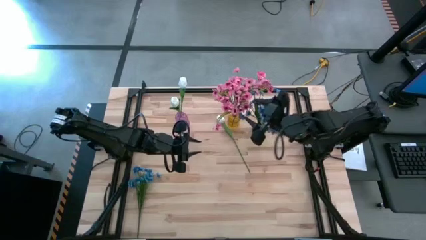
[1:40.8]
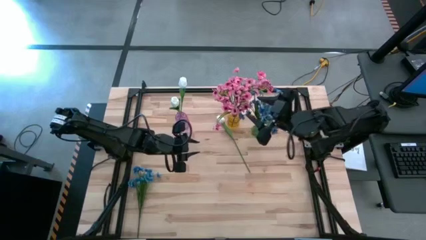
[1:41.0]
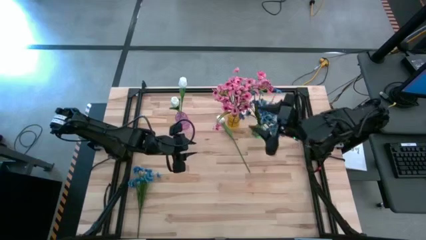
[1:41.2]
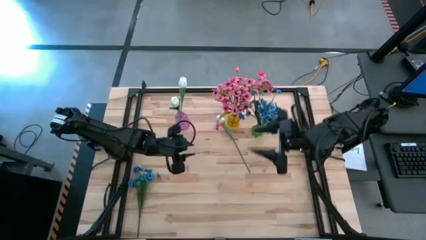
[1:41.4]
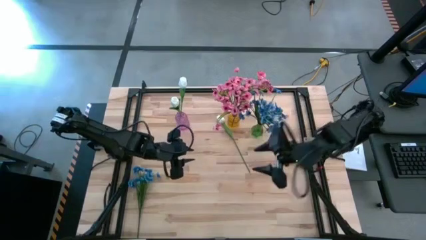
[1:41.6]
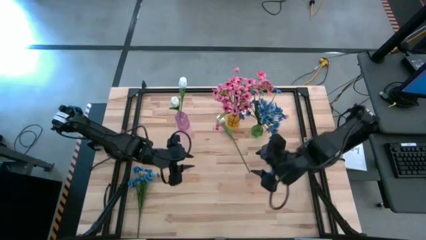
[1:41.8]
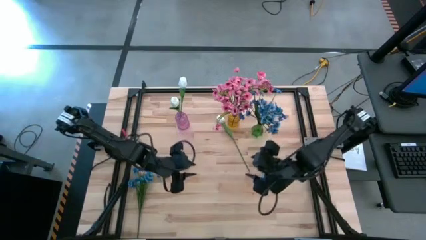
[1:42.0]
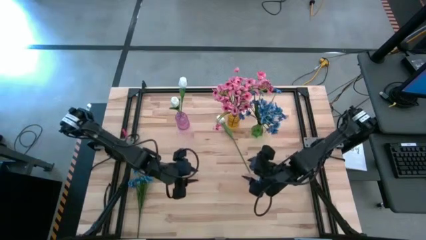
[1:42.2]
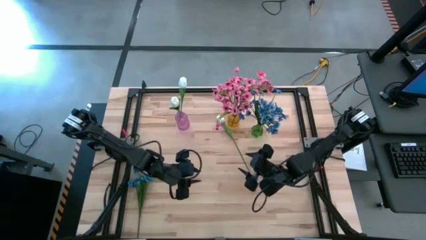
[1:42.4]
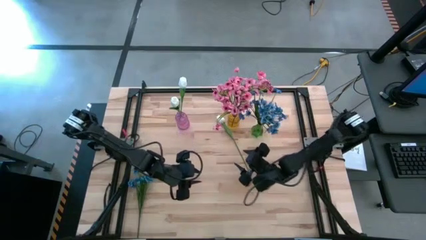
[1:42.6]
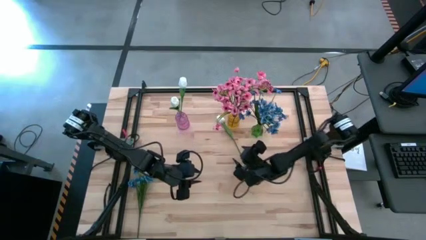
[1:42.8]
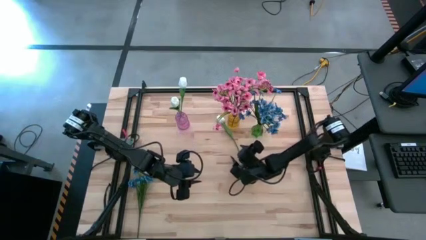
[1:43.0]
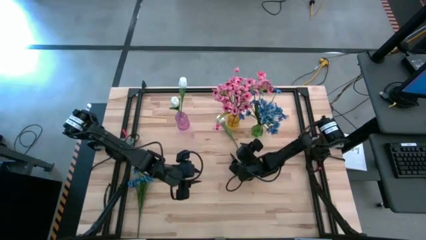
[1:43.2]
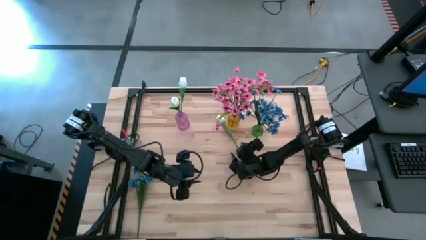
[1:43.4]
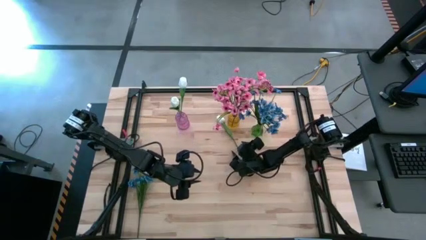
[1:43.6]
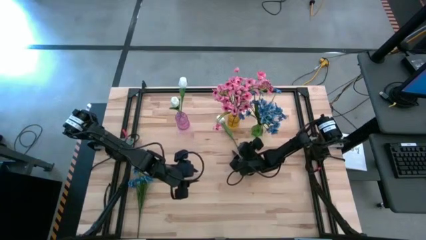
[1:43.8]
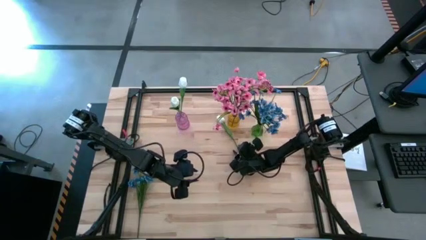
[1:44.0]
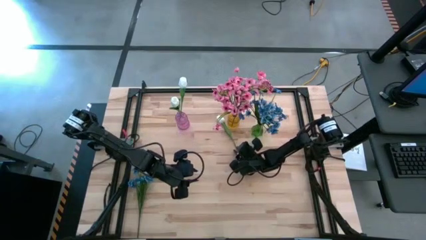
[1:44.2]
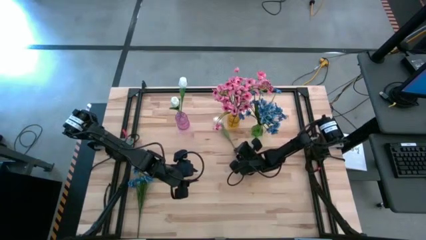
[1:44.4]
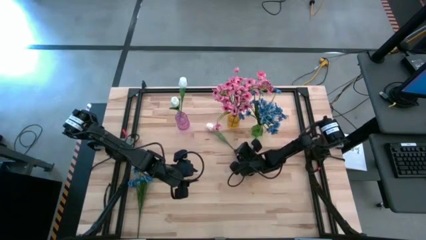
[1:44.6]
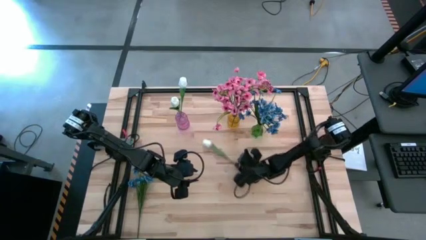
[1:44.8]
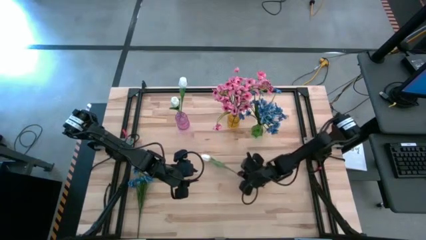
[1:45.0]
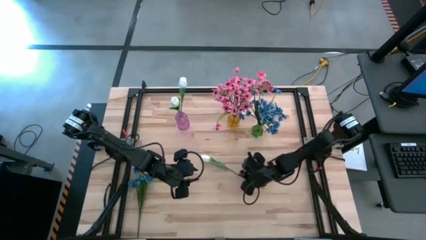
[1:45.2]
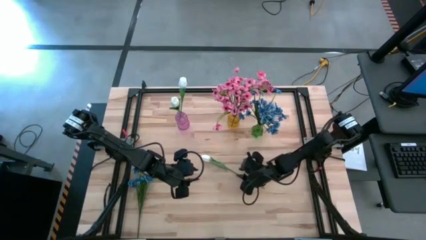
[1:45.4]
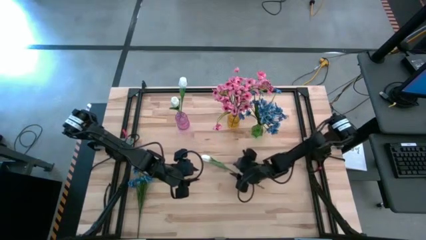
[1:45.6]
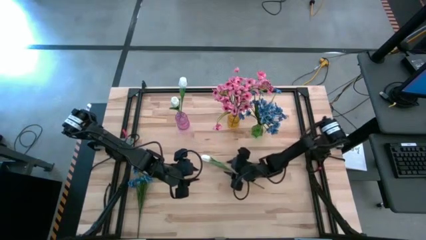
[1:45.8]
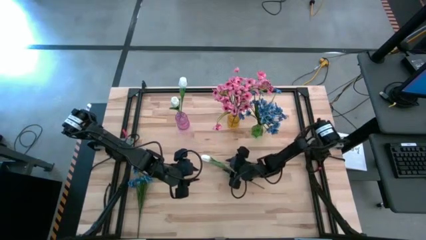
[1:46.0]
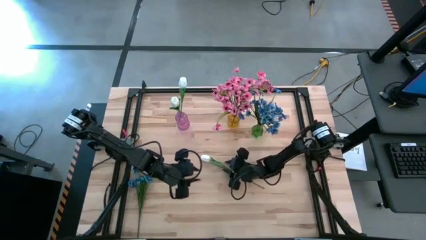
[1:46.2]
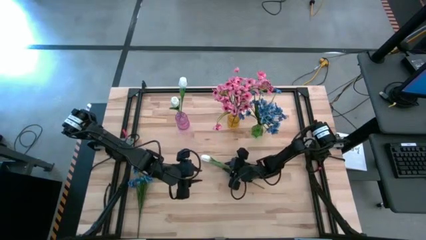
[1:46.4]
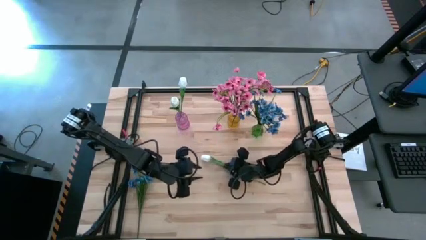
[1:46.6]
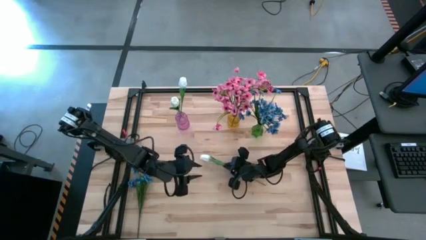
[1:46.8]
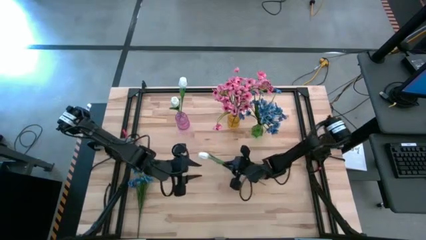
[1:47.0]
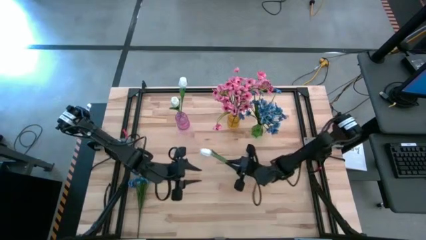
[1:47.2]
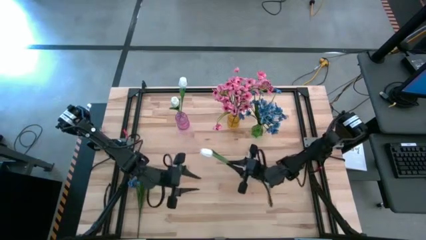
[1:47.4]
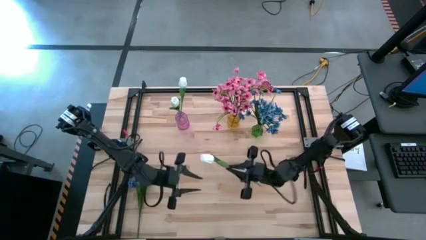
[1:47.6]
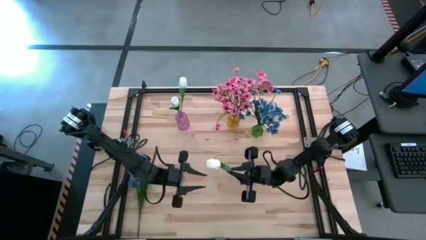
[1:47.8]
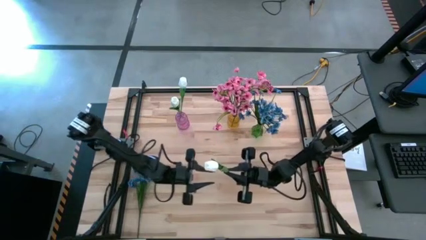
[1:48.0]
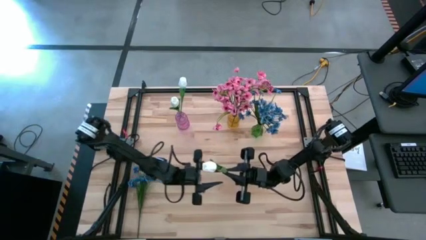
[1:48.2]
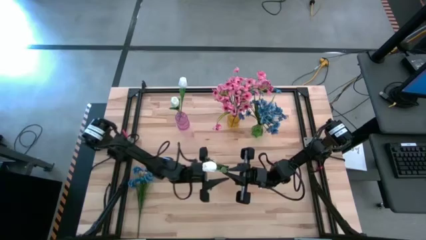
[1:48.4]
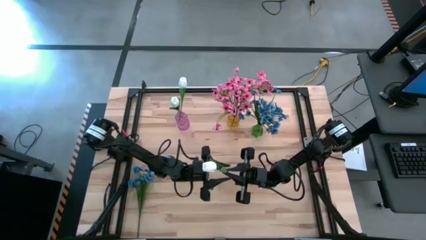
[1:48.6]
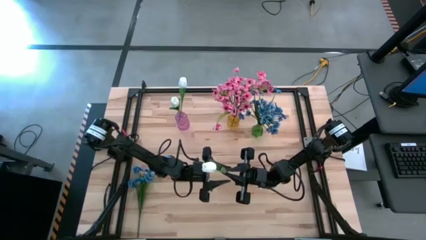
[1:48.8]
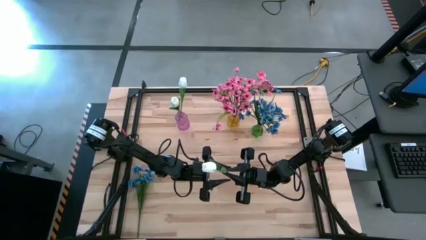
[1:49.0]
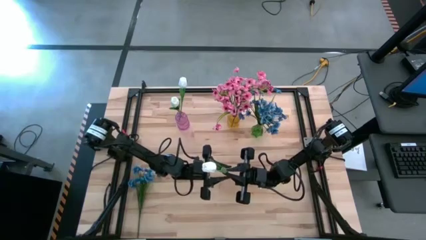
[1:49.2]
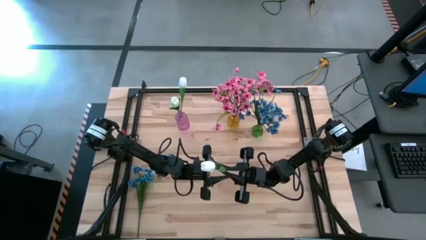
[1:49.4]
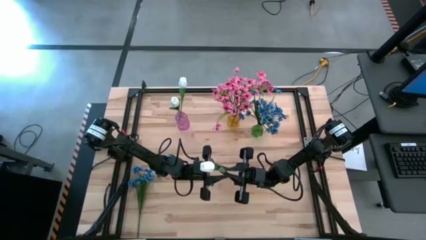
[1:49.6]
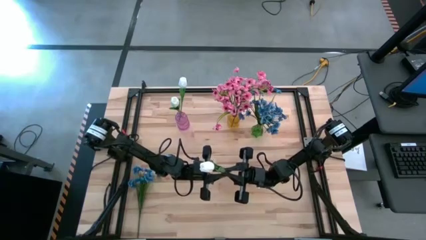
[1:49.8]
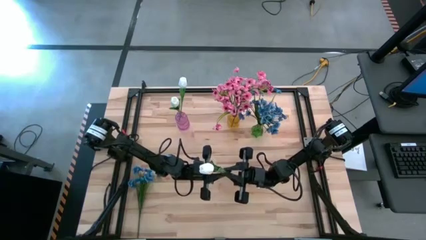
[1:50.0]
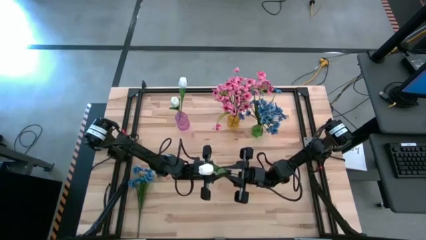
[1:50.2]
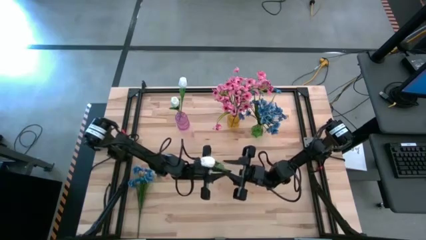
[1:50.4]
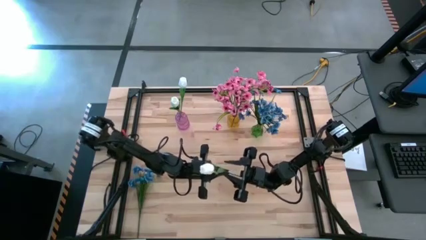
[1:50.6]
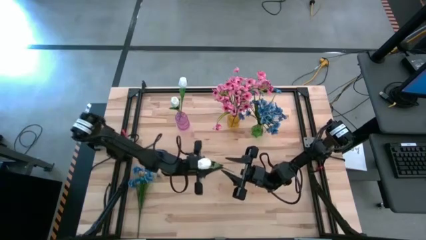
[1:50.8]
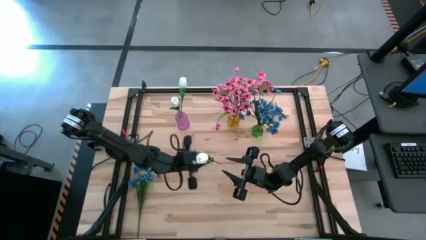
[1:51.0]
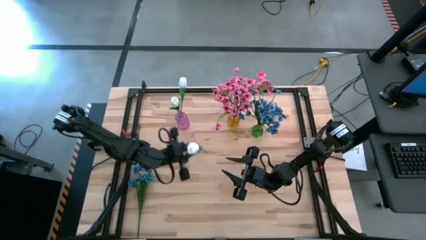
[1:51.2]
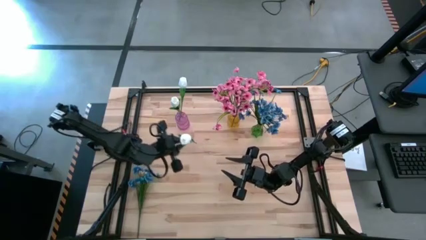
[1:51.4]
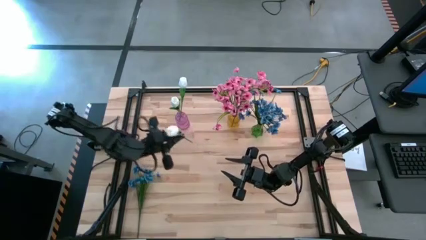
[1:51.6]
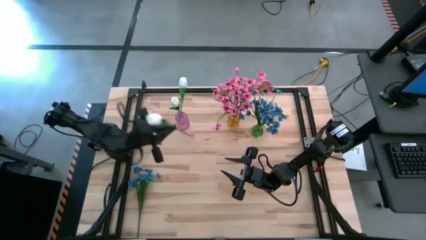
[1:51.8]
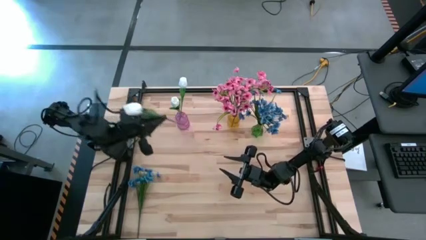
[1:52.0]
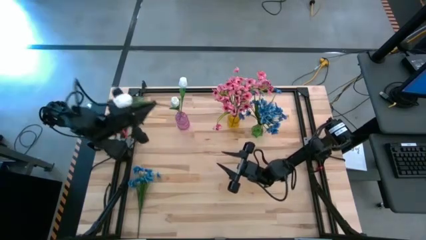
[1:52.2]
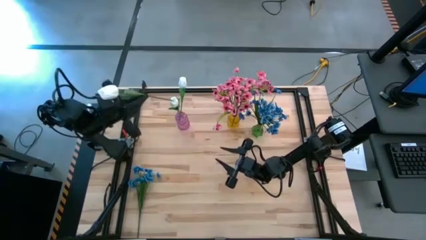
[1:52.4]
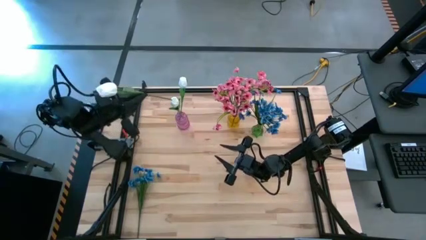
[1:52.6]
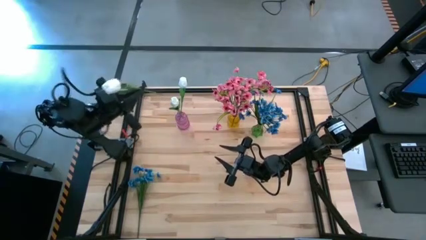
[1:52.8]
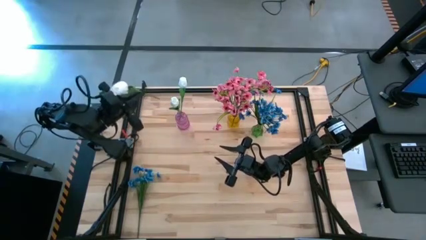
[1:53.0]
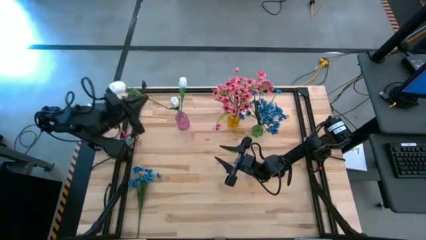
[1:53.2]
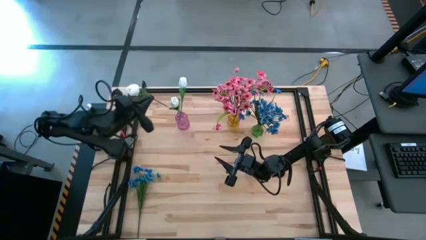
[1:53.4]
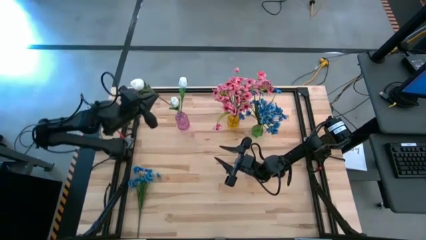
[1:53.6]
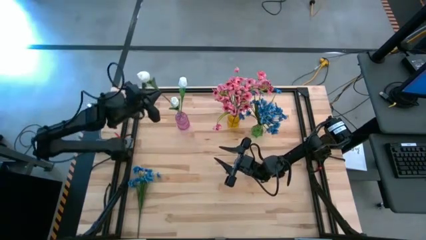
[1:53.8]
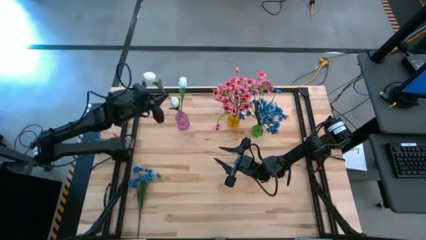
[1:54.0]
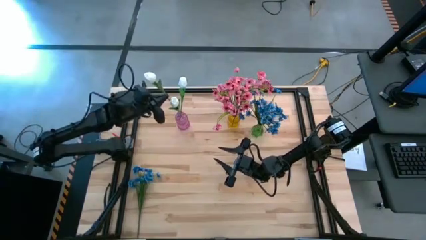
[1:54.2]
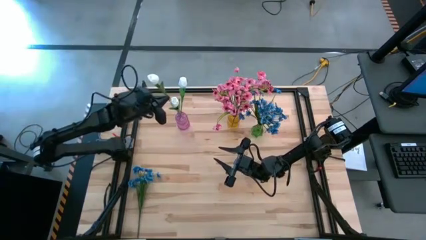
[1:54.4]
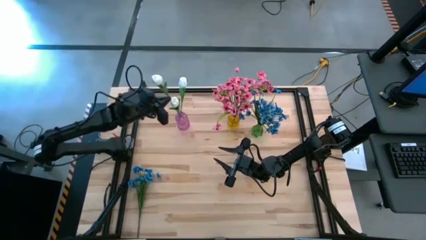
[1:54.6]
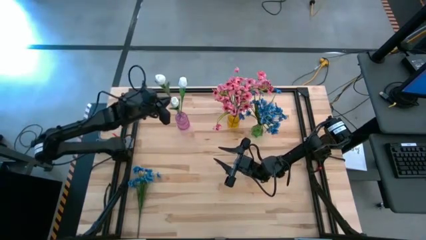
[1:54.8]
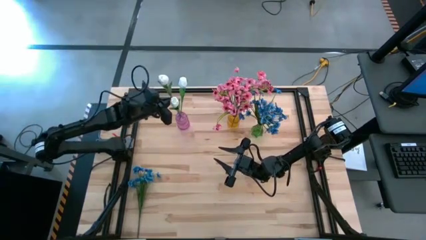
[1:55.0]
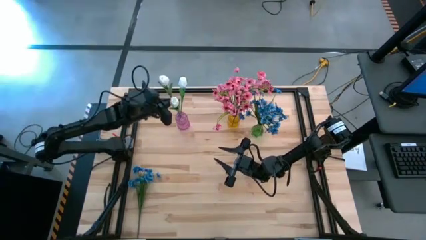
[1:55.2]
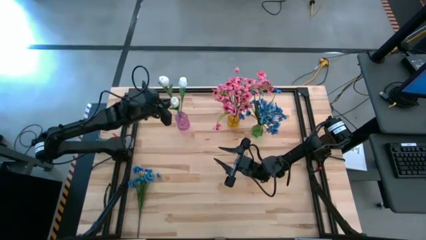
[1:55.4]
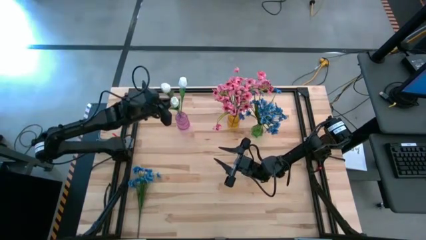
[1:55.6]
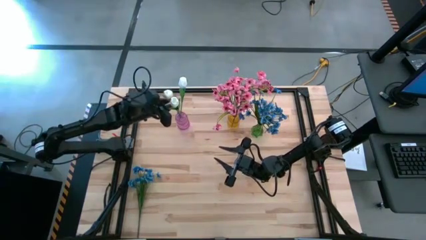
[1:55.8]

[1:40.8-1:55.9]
Task: Sort flowers into vase by color
Put the white tulip into the violet vase
